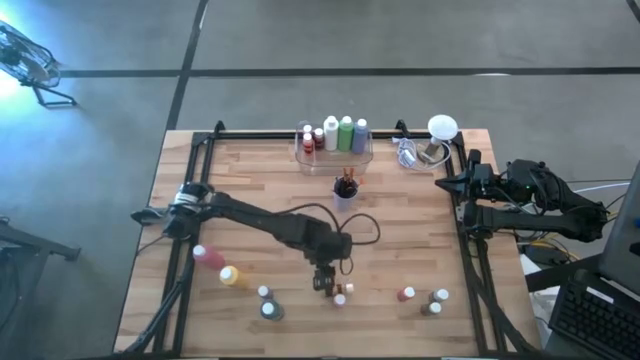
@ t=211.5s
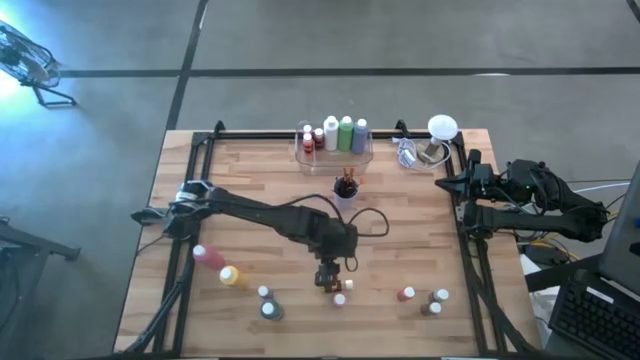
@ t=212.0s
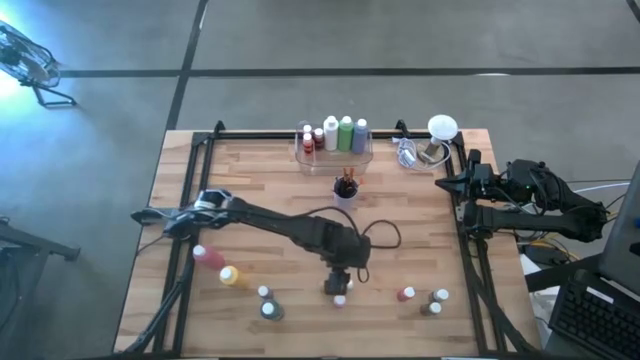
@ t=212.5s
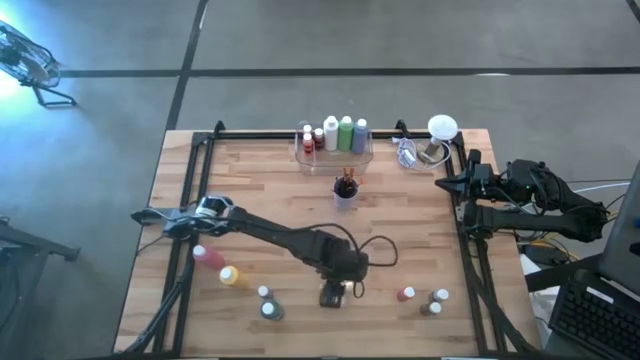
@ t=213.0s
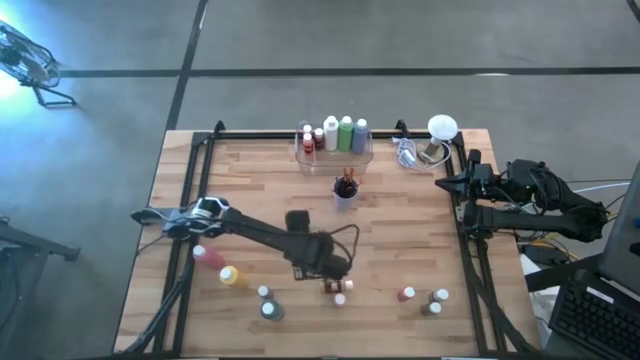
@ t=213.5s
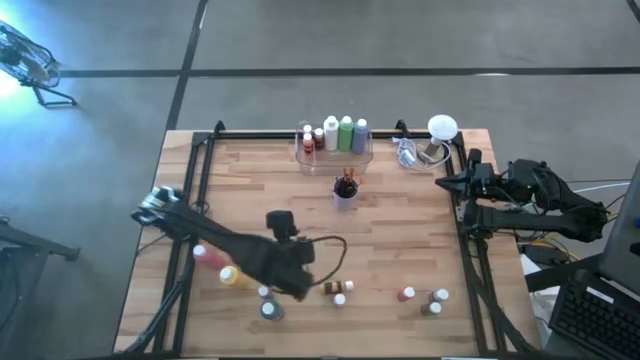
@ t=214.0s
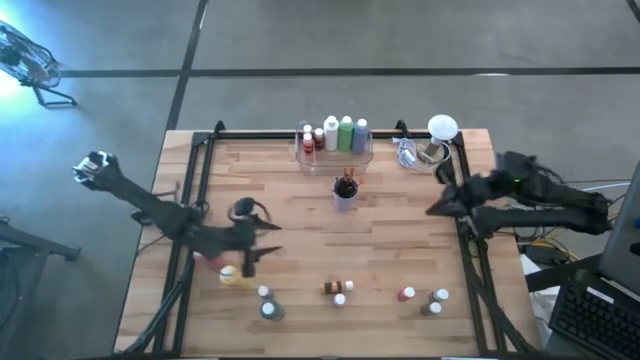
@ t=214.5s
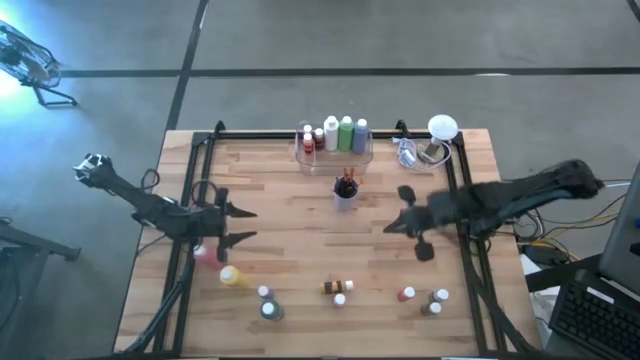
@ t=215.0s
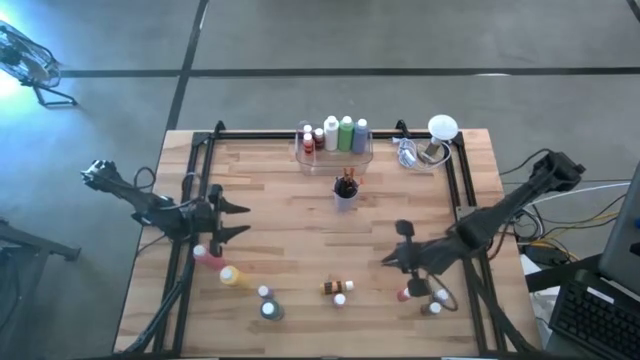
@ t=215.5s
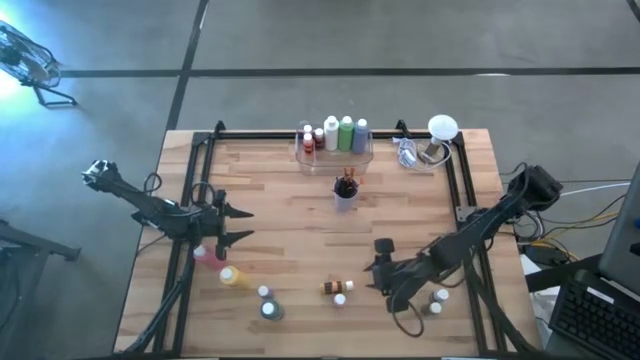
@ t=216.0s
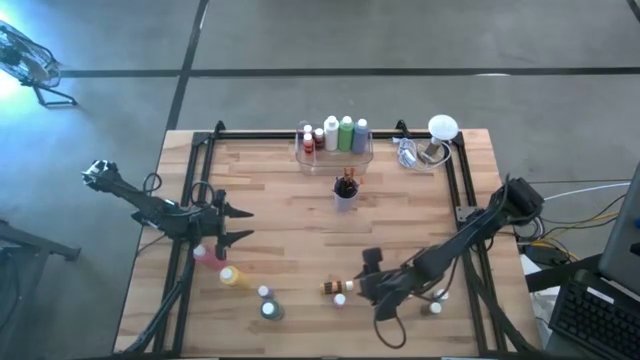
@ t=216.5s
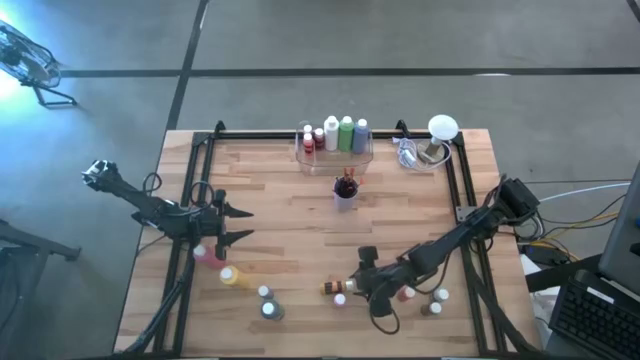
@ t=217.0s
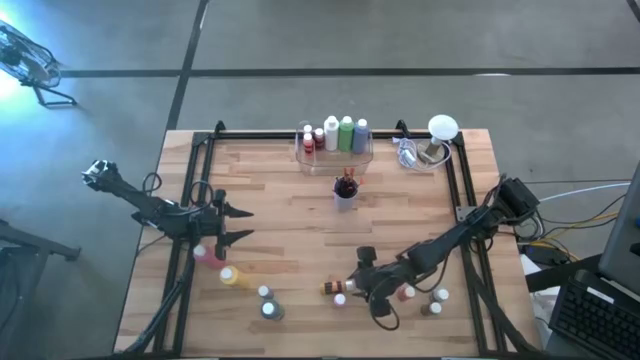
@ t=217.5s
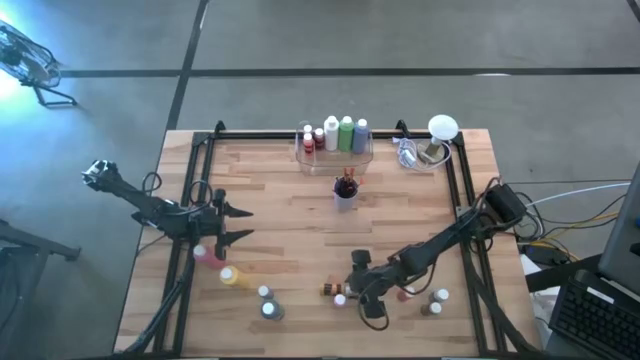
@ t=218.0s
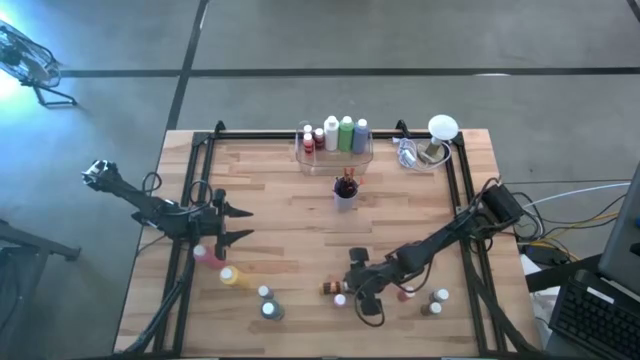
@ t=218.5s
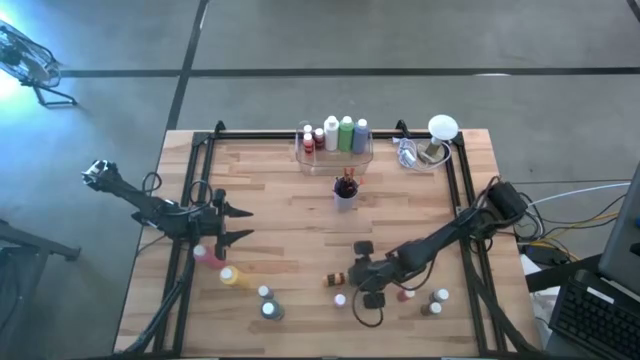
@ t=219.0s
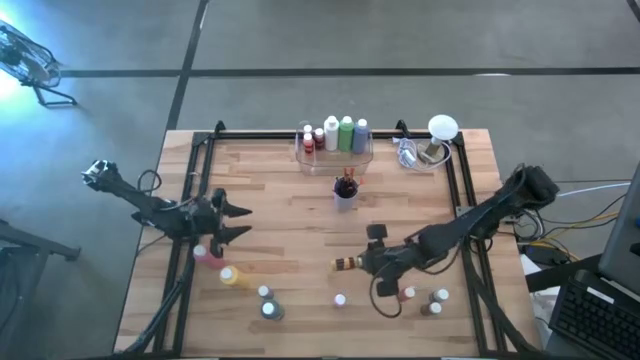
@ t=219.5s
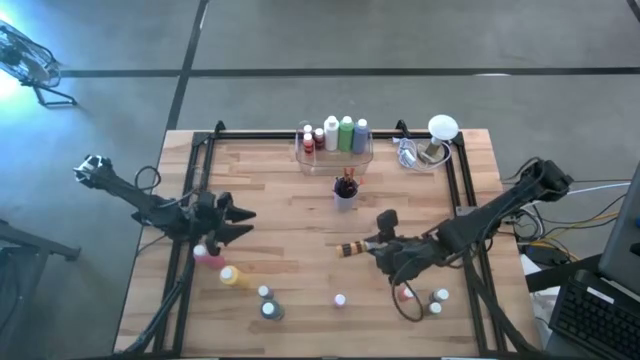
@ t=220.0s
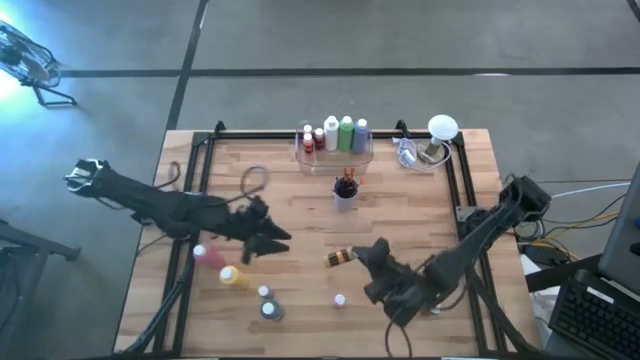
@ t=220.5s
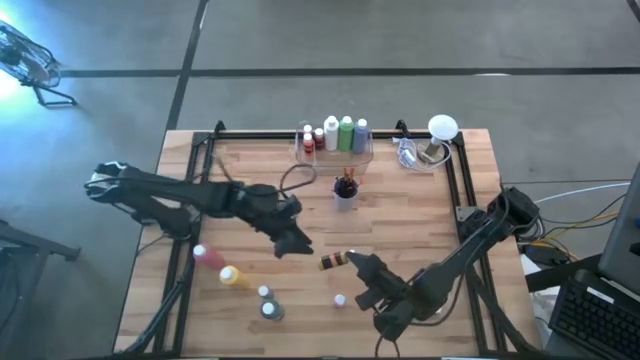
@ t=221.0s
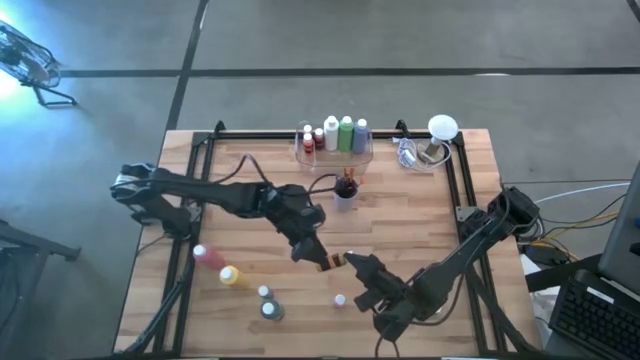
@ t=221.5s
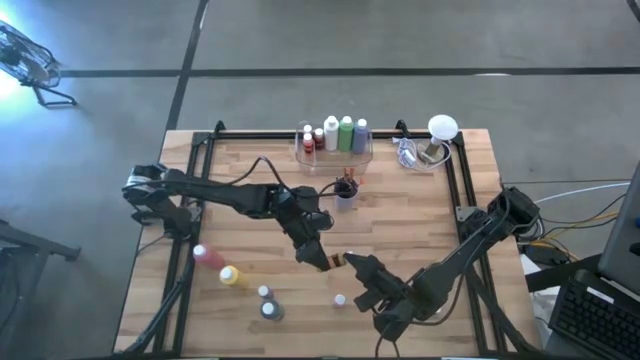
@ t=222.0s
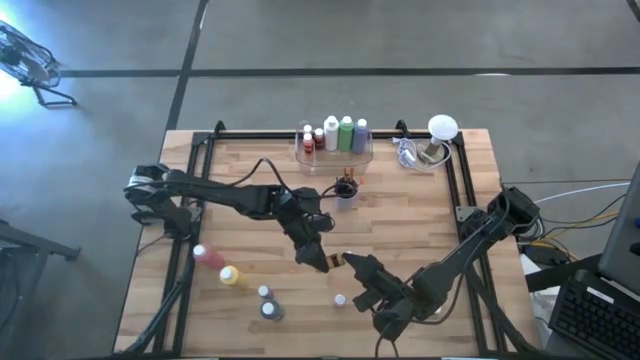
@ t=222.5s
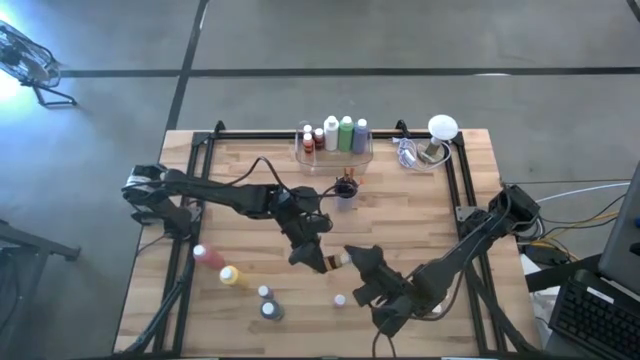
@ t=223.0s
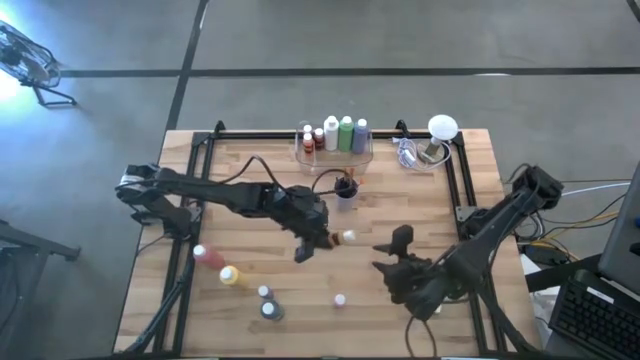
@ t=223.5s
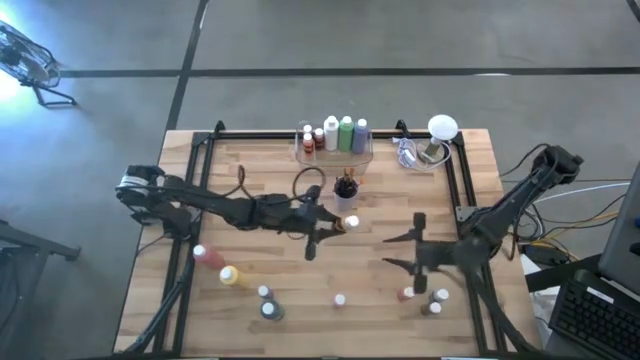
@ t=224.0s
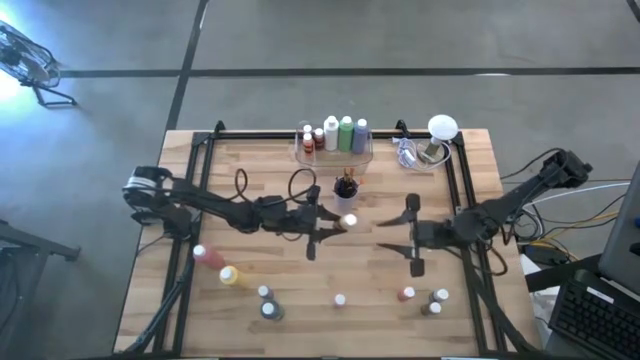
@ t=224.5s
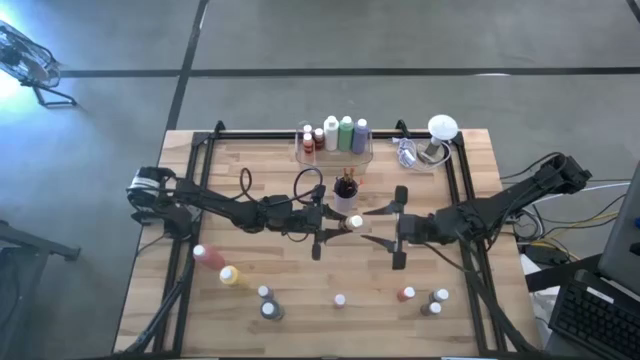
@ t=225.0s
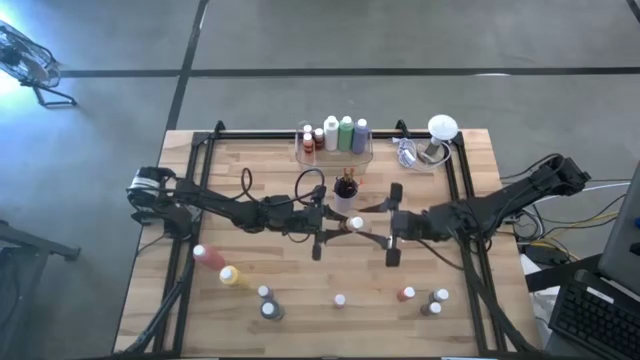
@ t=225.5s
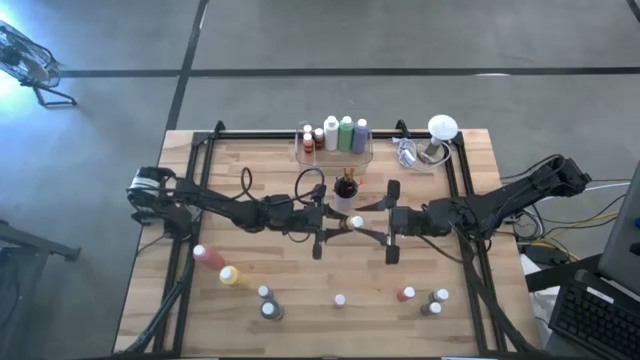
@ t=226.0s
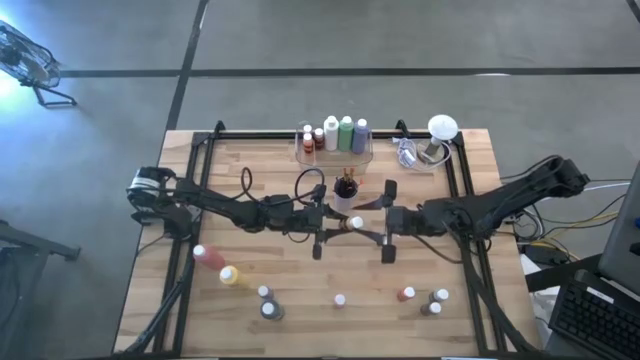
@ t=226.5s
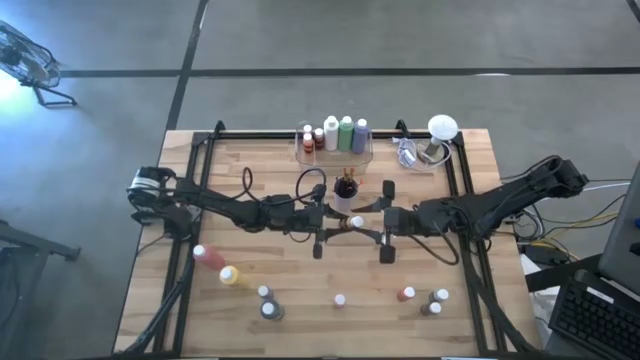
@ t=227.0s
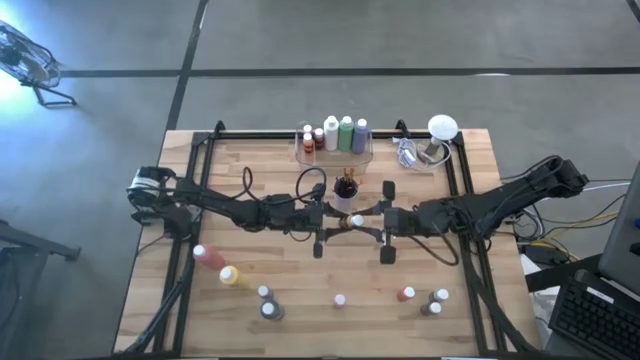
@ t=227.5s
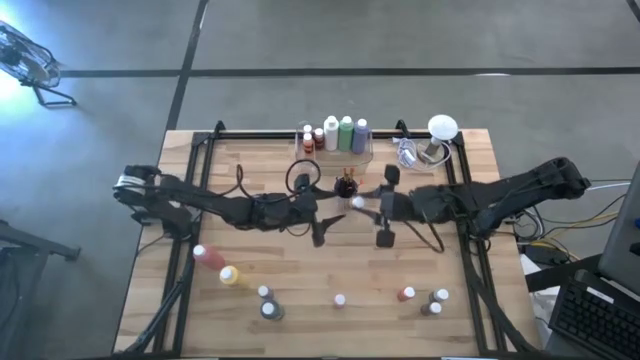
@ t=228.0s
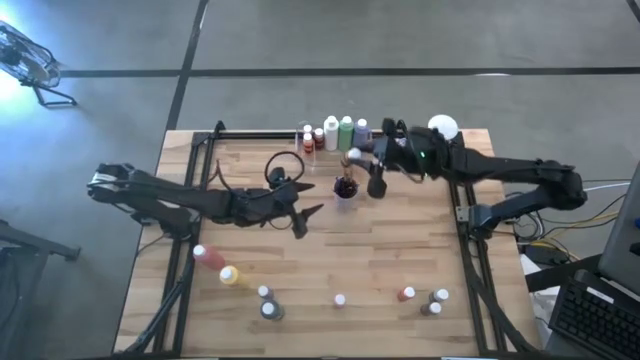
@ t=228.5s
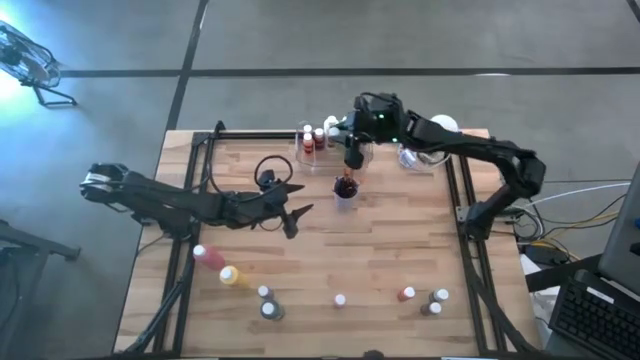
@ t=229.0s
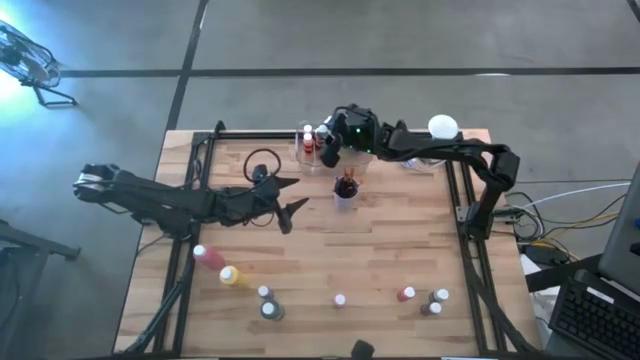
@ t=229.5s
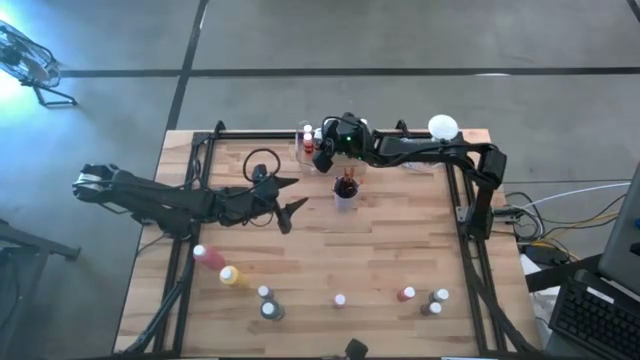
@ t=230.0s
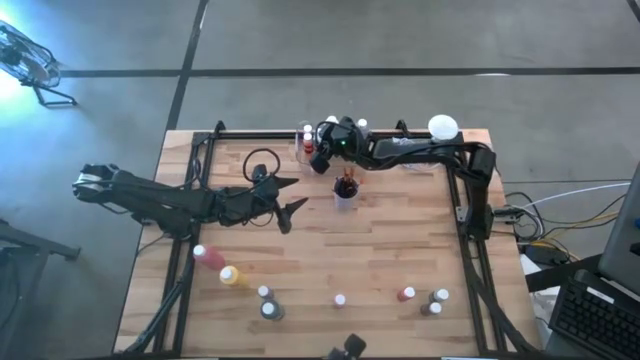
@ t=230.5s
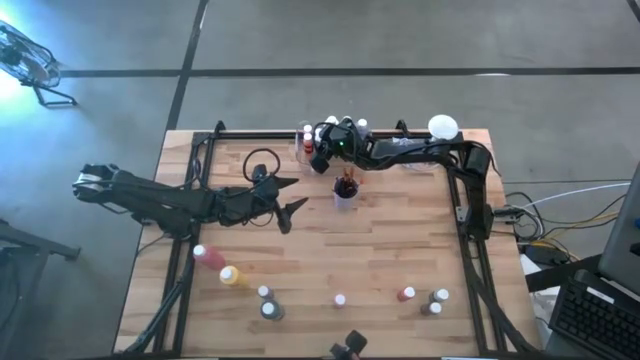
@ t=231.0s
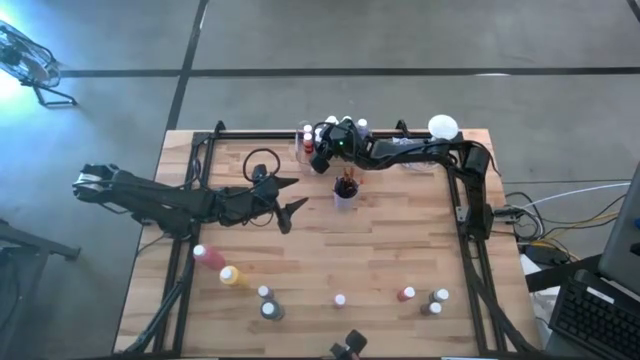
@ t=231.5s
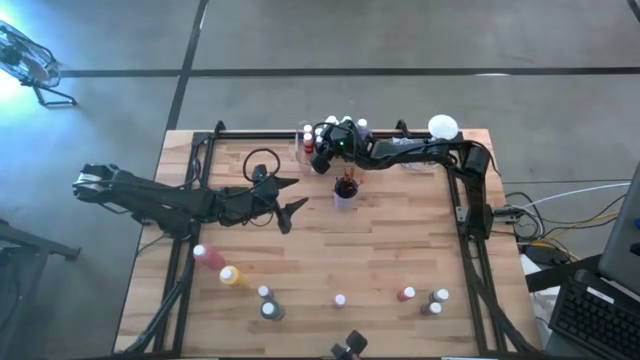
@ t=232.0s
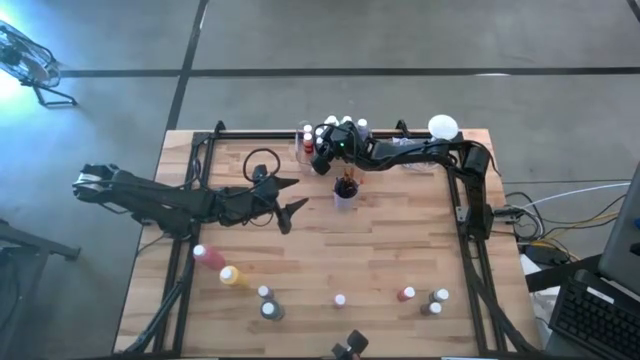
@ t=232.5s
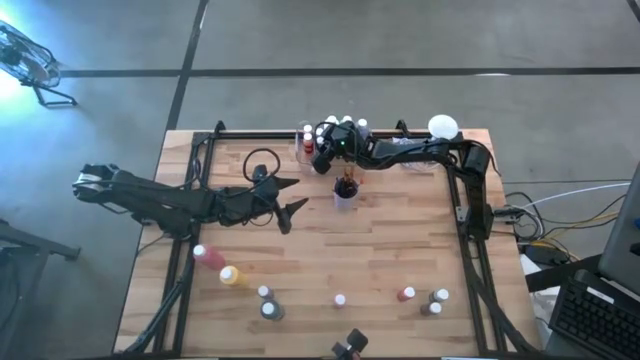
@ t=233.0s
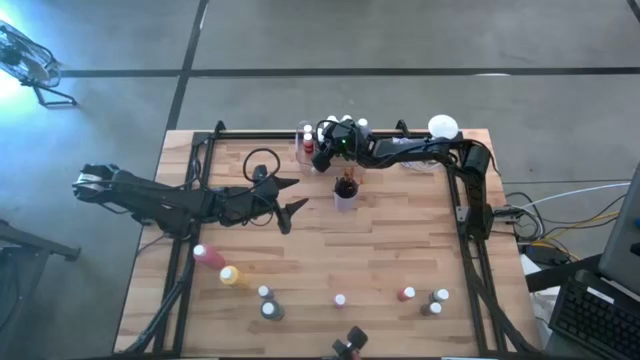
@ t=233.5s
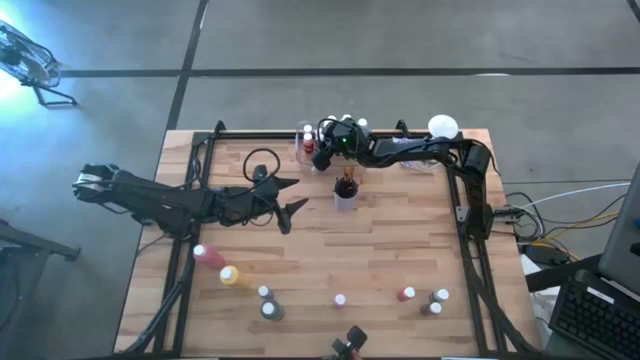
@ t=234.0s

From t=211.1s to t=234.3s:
Task: Pick & Place Paint Supplies
Put the yellow black paint bottle into the transparent bin
